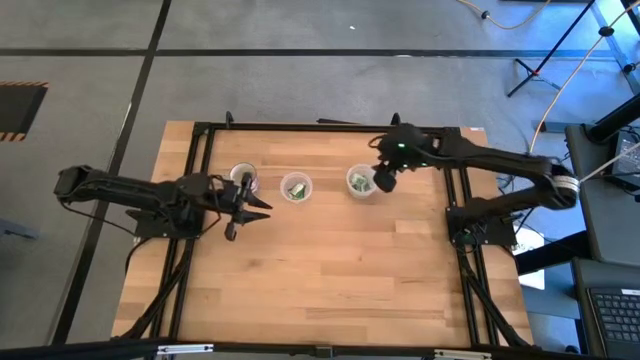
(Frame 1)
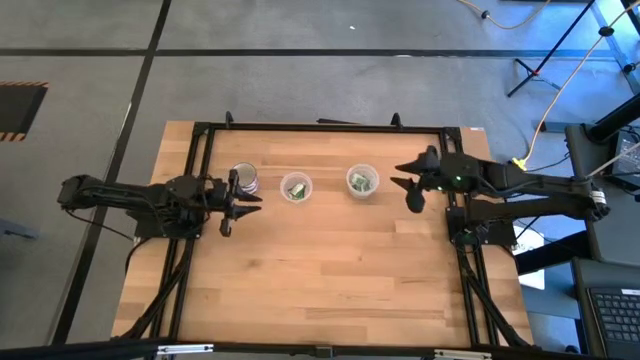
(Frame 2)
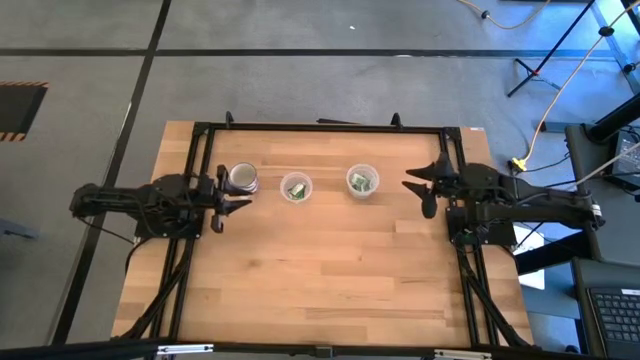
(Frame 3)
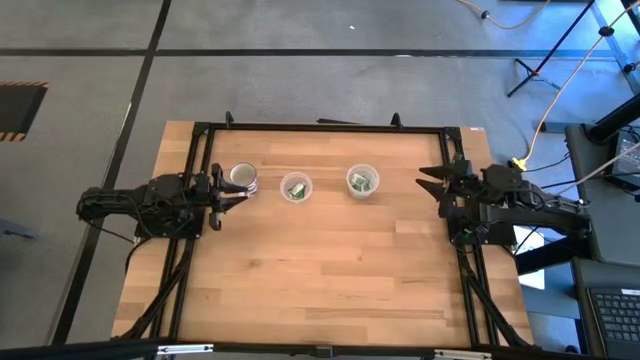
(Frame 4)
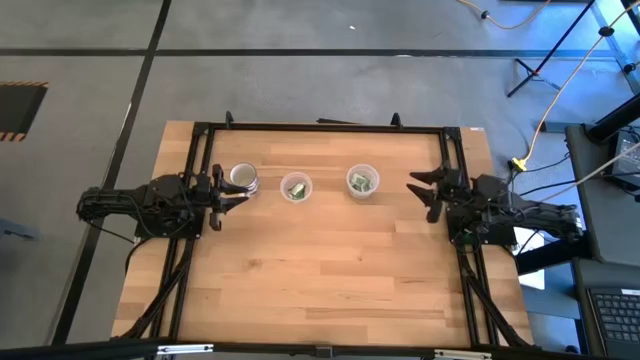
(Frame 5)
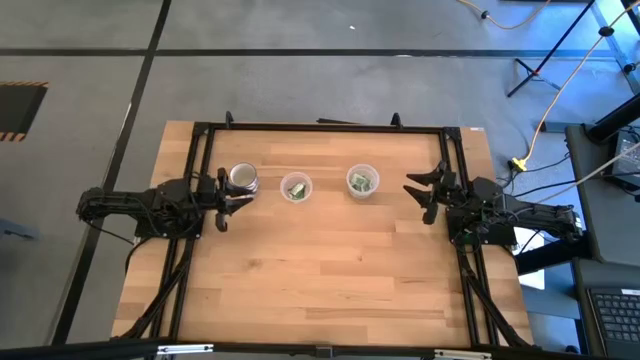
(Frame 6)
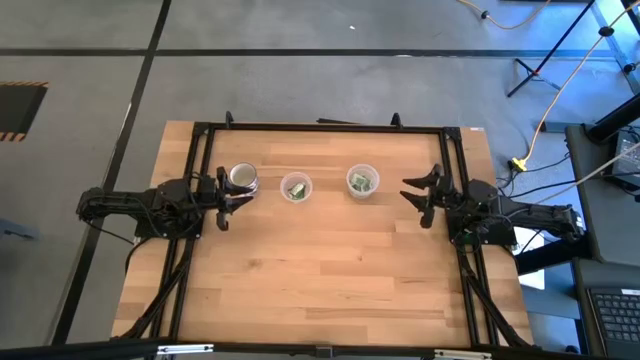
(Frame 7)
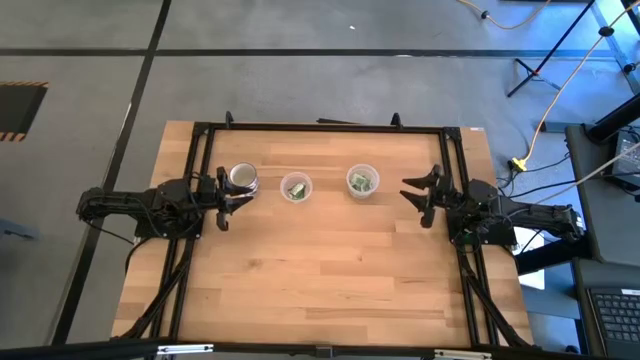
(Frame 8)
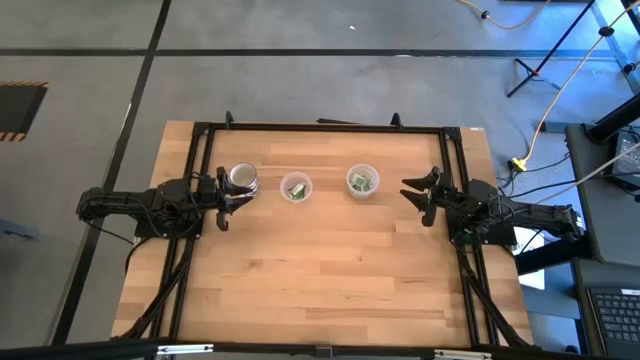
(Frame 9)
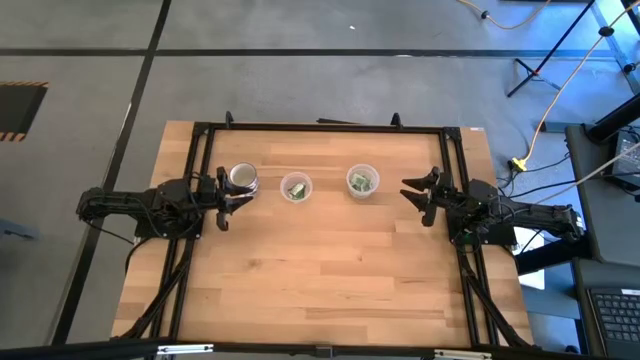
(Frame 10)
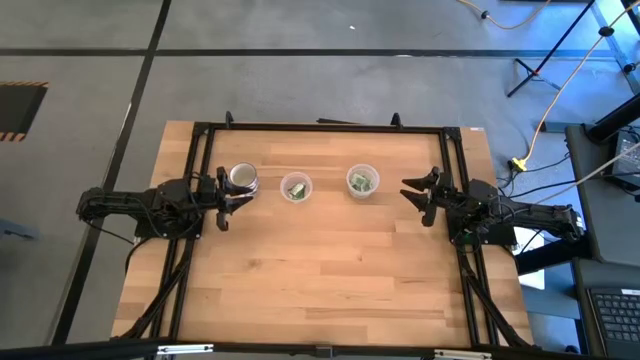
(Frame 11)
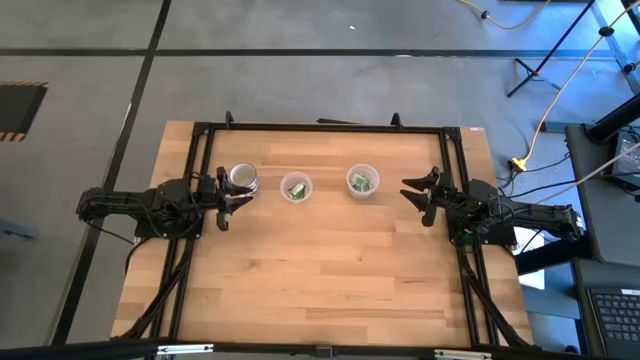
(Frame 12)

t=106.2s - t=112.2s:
Task: Pick and place items into bin
Return to Home Position

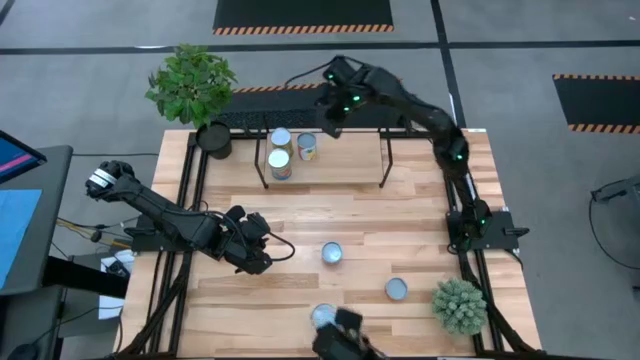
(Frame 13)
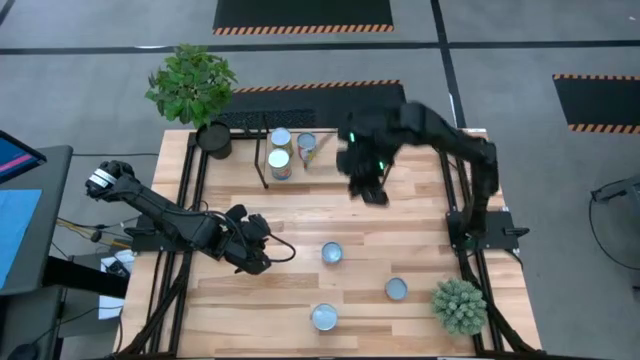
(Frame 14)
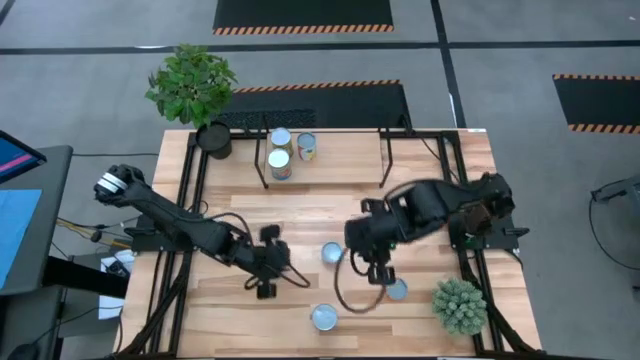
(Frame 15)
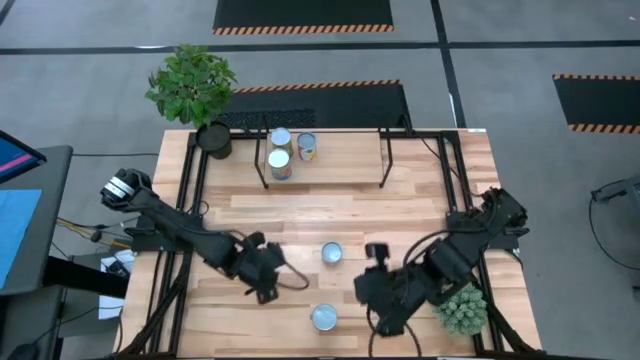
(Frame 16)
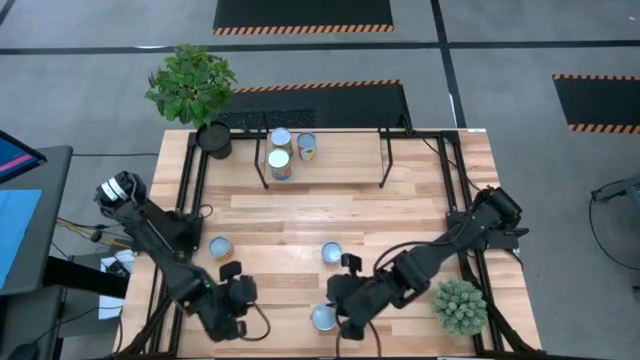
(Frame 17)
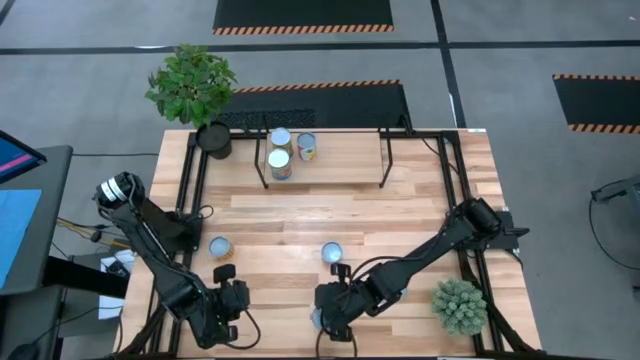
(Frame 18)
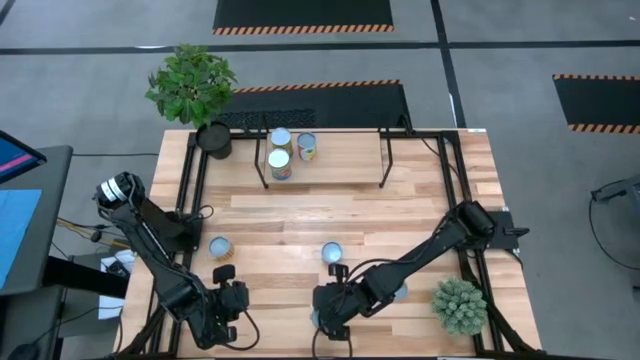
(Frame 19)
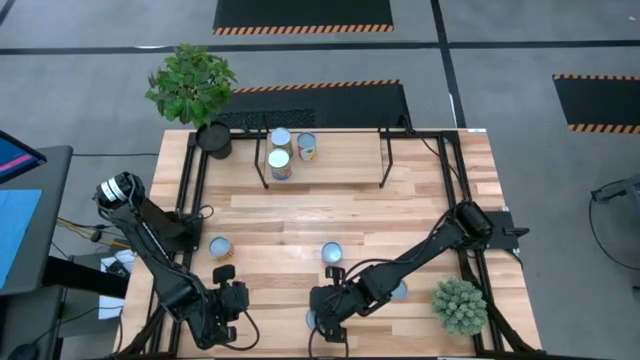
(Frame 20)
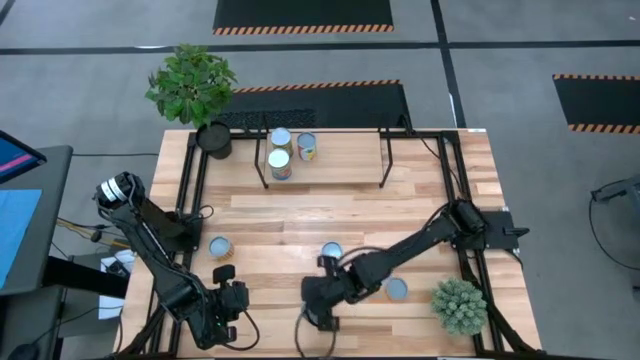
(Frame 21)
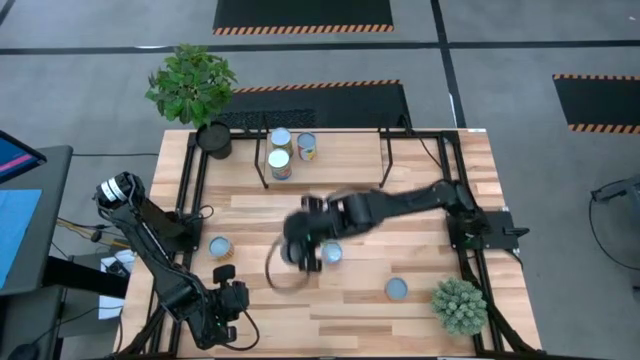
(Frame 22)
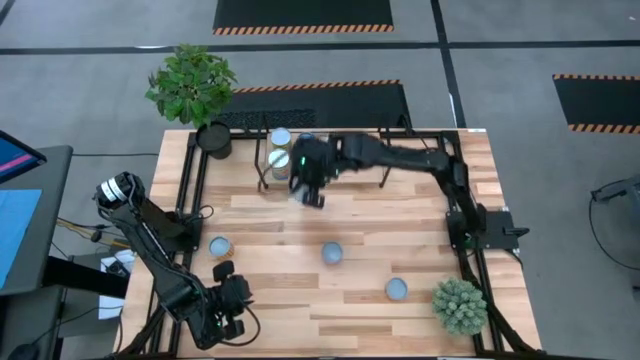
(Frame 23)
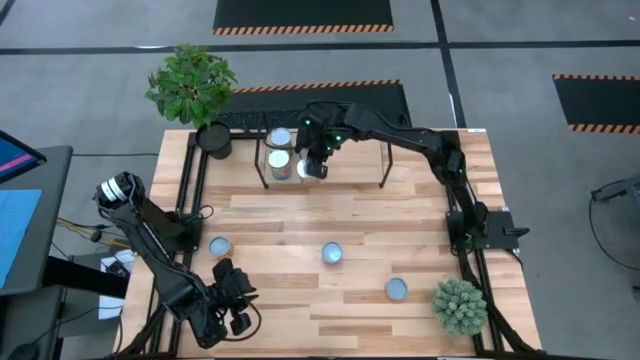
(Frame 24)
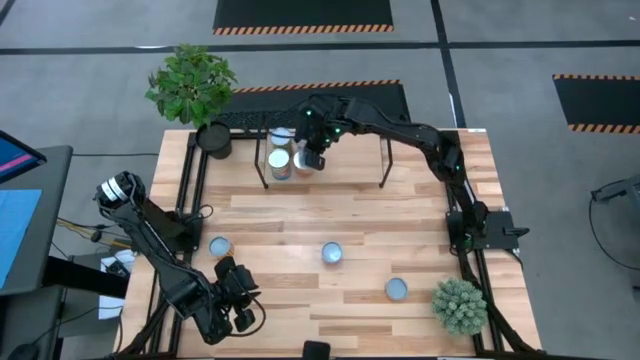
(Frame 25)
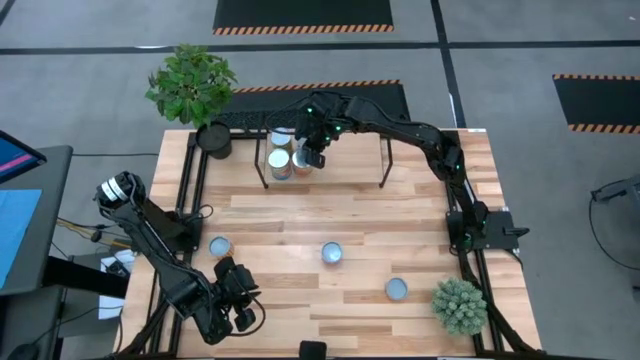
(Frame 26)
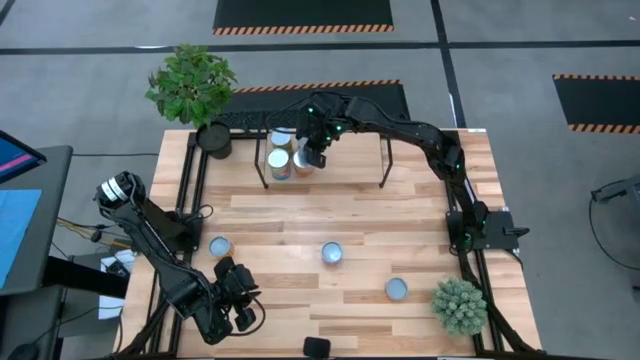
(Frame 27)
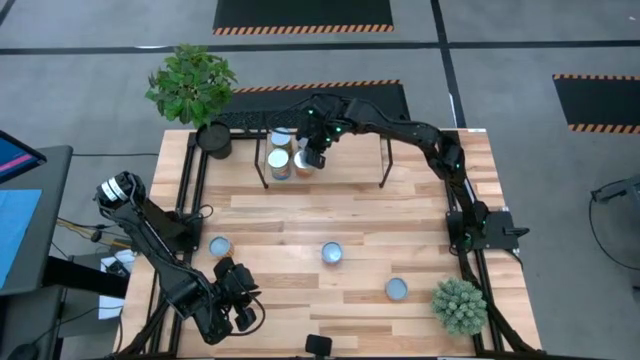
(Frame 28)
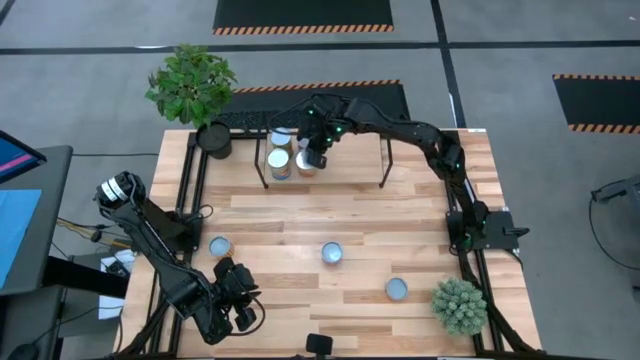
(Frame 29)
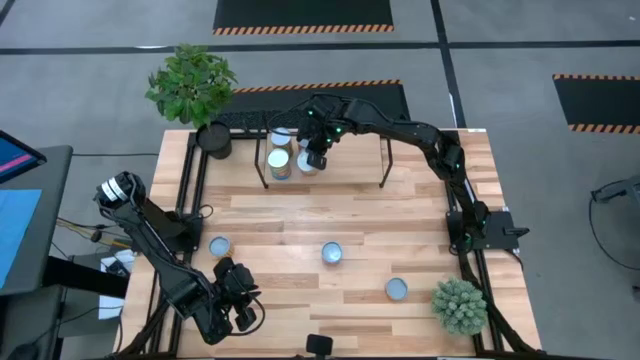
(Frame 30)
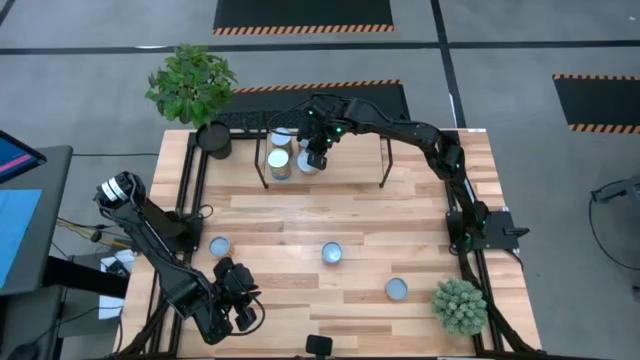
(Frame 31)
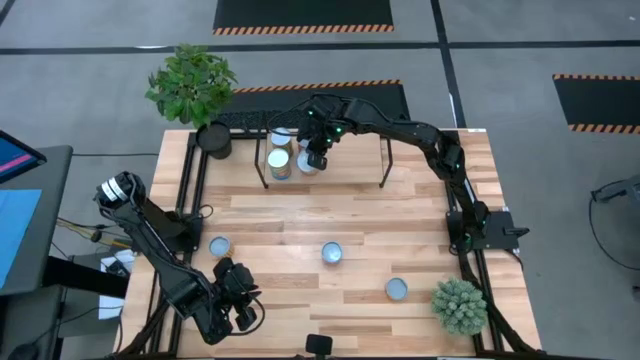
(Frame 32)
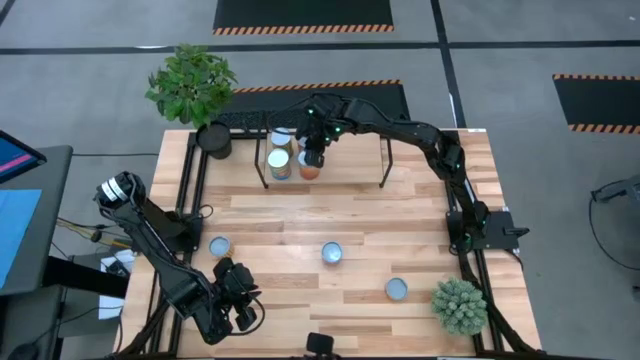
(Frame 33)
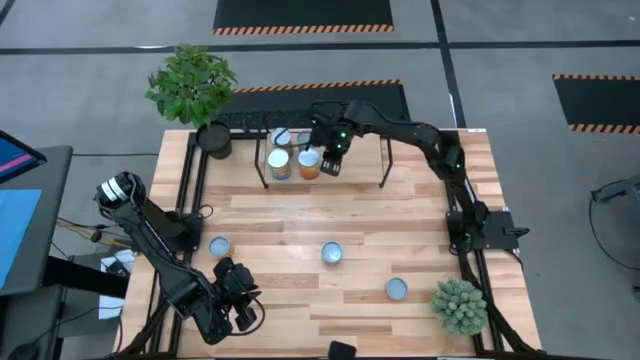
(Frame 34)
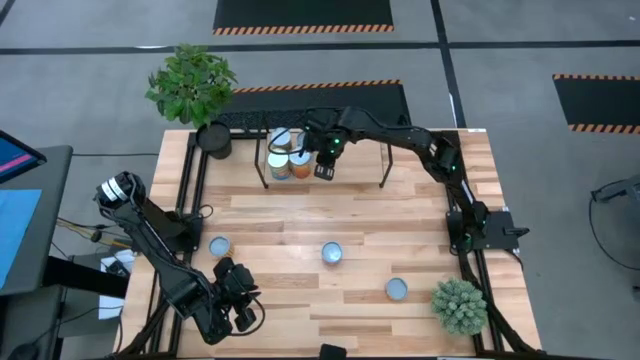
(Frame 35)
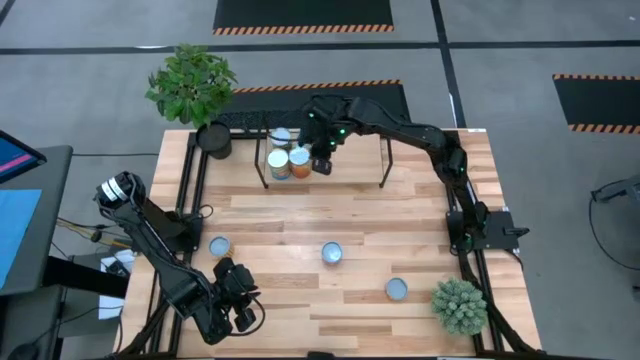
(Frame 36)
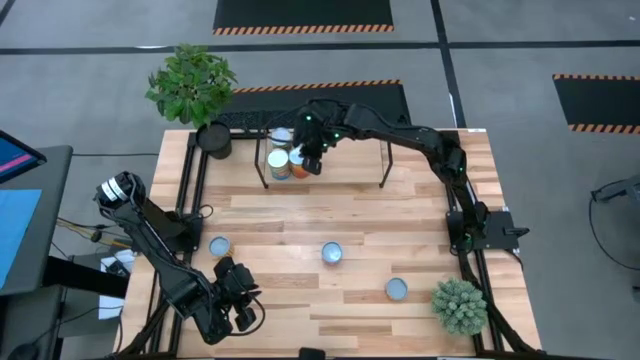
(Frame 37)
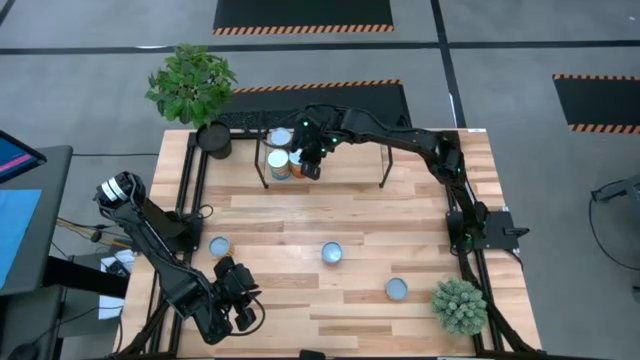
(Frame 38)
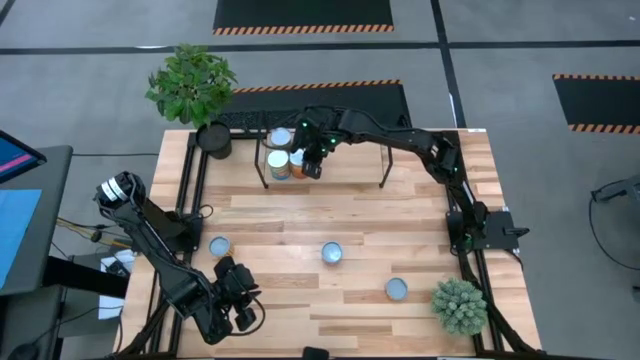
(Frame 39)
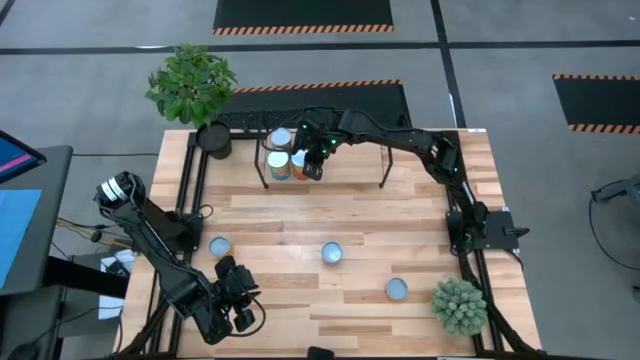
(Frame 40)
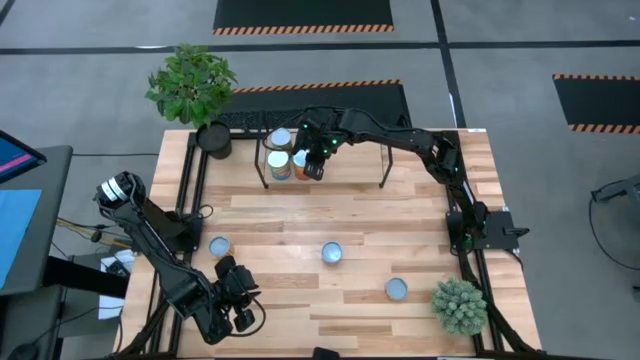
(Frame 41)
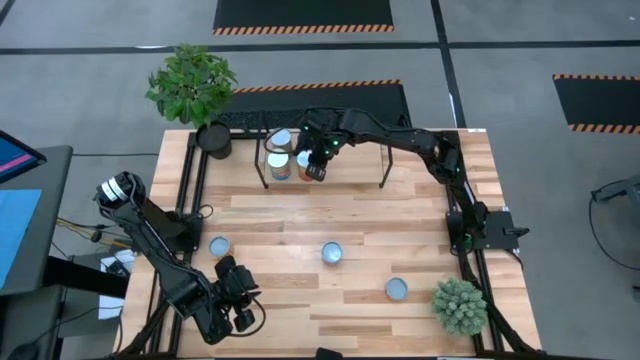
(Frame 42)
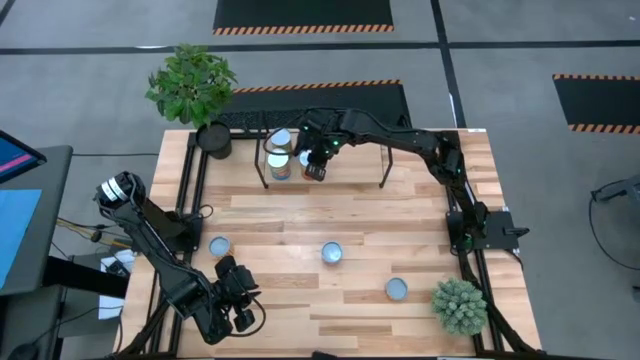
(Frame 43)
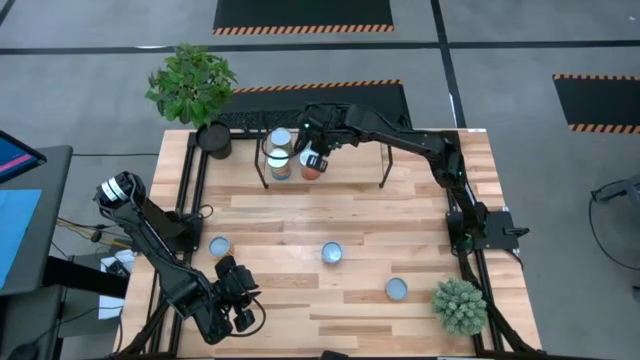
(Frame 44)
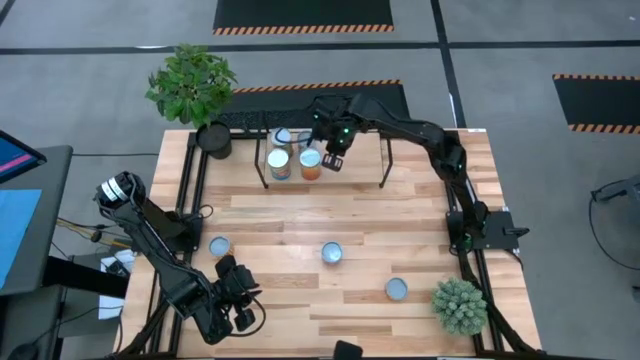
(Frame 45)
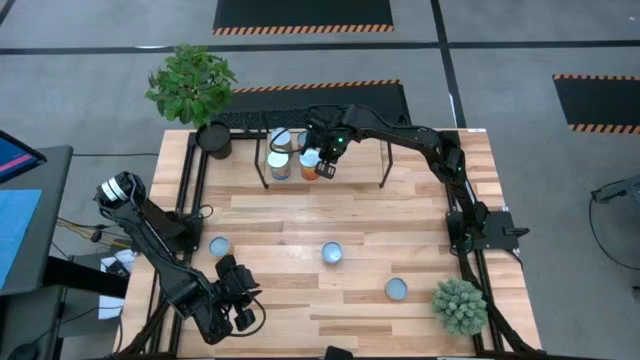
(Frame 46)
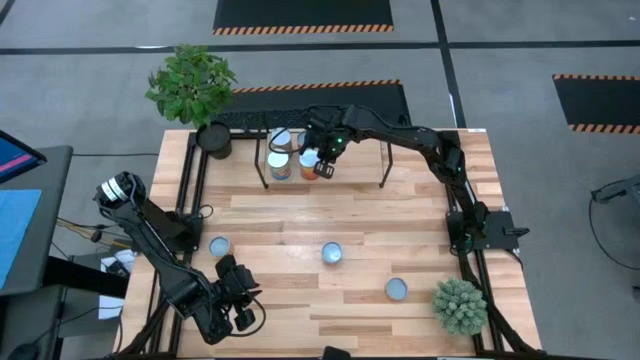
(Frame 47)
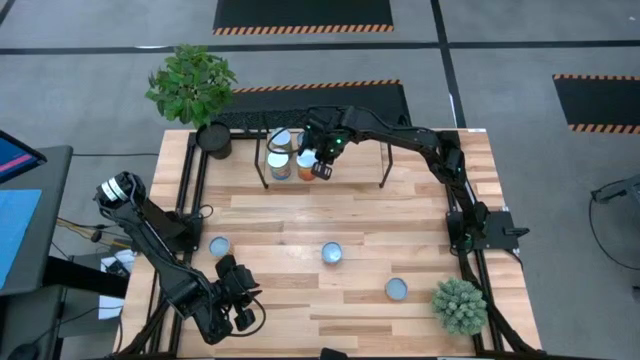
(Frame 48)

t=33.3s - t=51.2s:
Task: Pick and place cans onto a shelf
Put the canned green beans on the shelf
